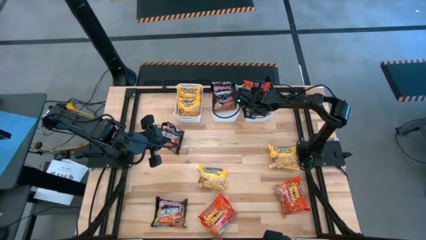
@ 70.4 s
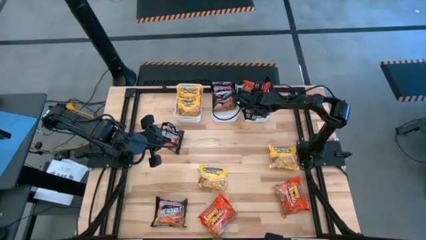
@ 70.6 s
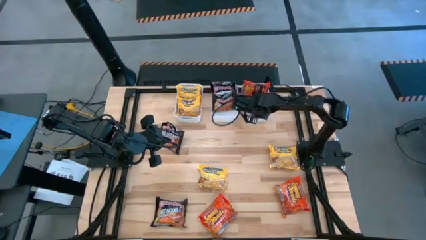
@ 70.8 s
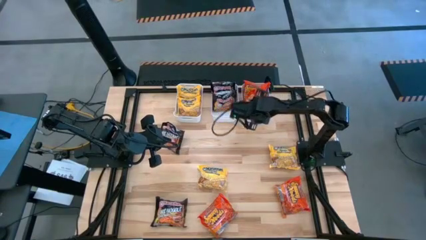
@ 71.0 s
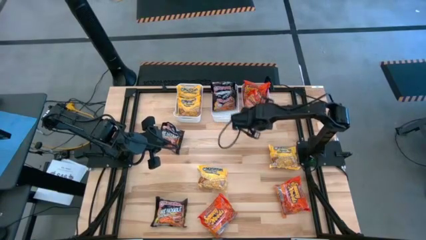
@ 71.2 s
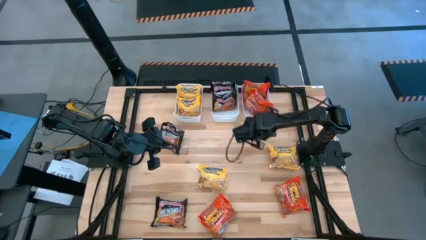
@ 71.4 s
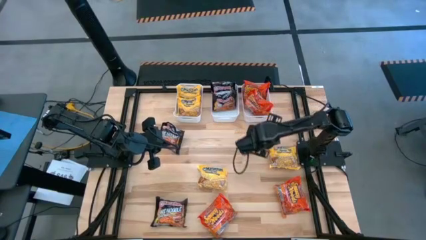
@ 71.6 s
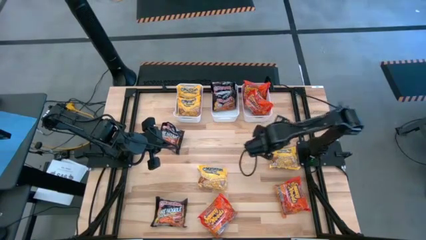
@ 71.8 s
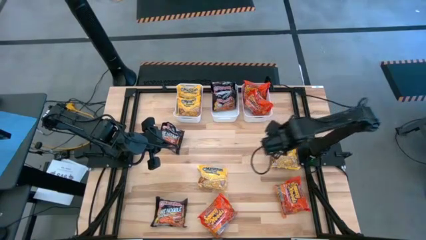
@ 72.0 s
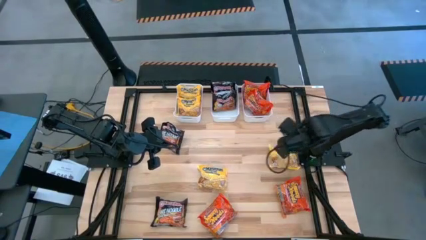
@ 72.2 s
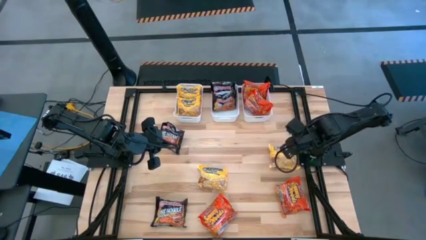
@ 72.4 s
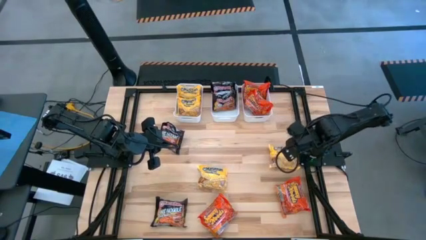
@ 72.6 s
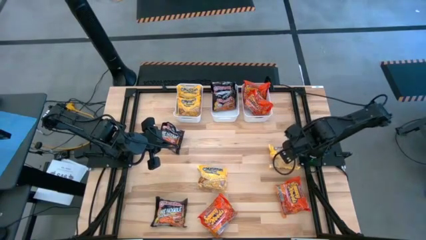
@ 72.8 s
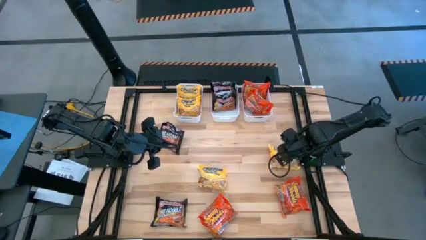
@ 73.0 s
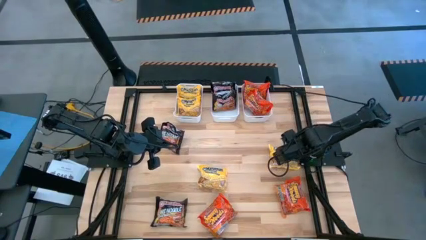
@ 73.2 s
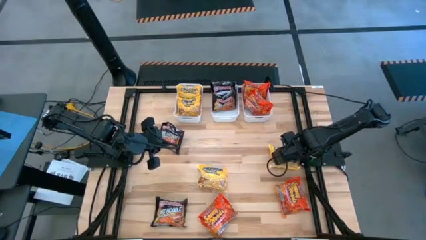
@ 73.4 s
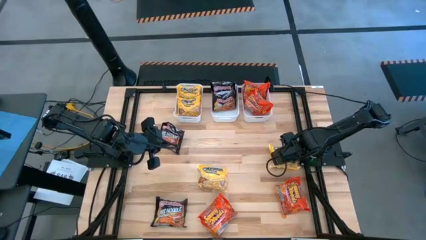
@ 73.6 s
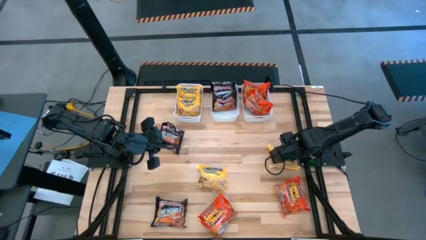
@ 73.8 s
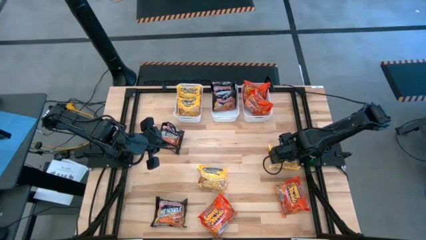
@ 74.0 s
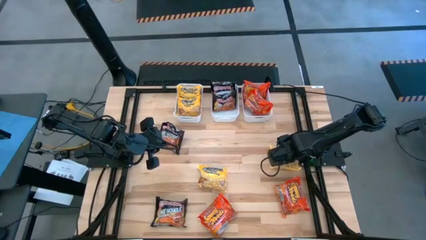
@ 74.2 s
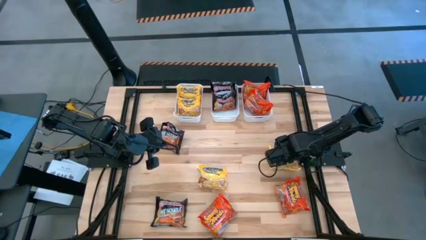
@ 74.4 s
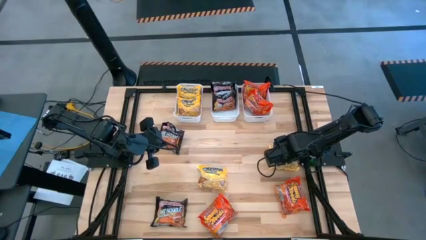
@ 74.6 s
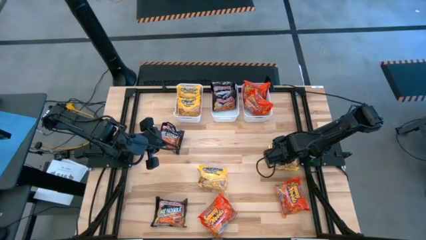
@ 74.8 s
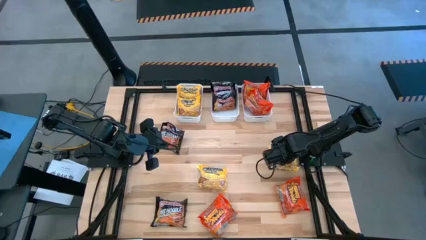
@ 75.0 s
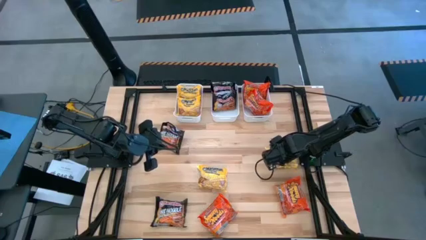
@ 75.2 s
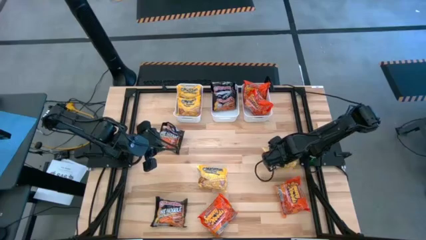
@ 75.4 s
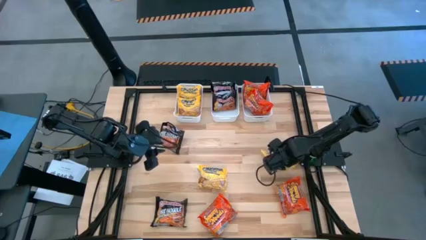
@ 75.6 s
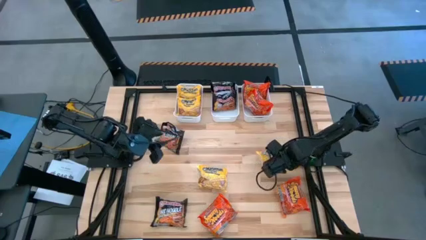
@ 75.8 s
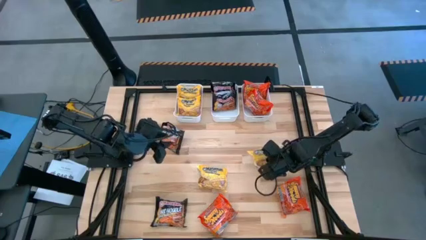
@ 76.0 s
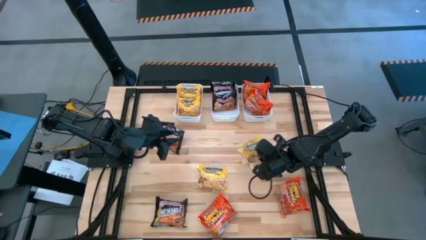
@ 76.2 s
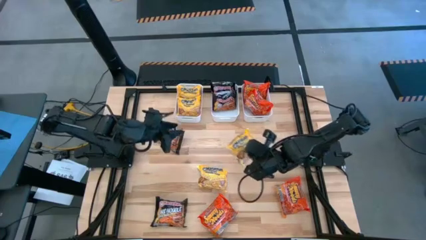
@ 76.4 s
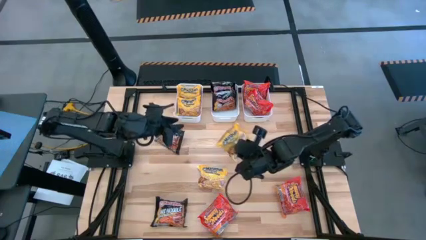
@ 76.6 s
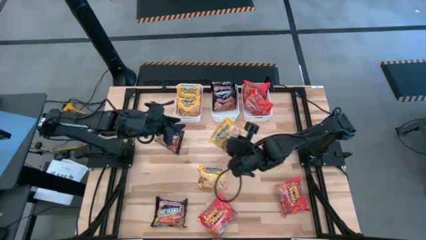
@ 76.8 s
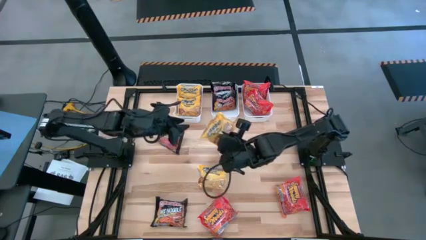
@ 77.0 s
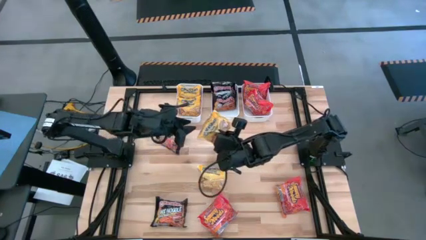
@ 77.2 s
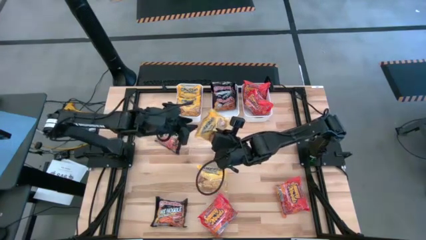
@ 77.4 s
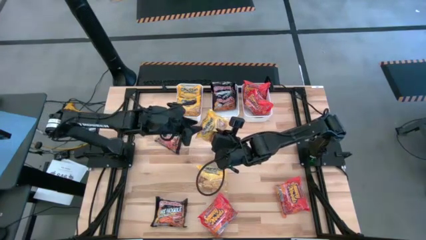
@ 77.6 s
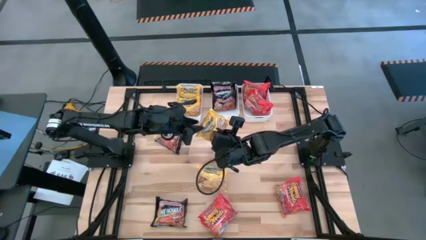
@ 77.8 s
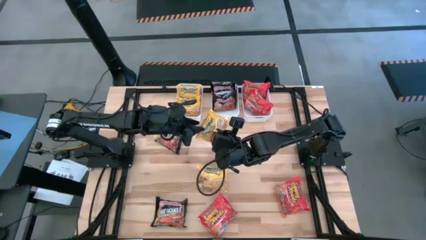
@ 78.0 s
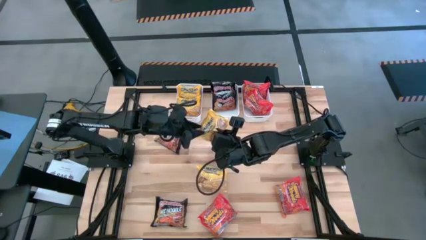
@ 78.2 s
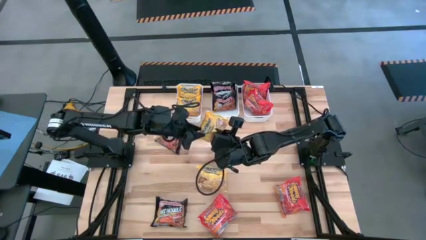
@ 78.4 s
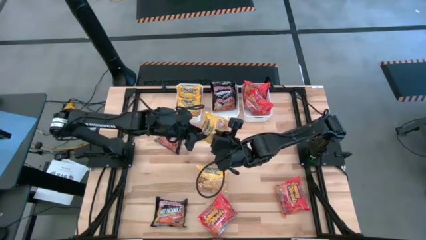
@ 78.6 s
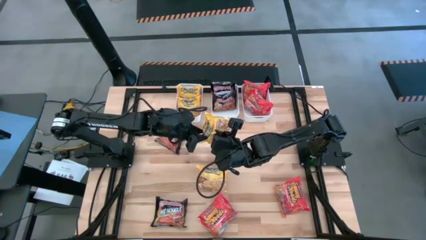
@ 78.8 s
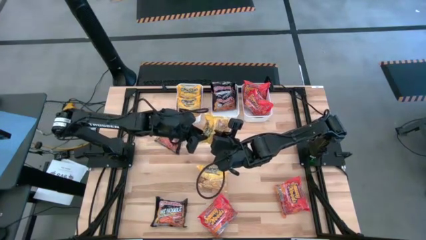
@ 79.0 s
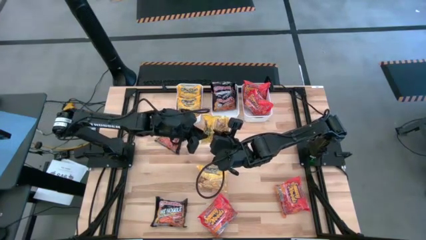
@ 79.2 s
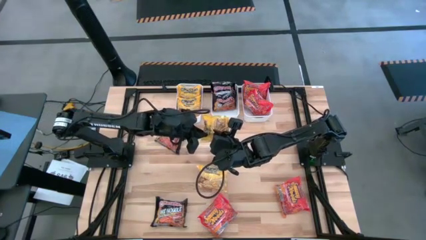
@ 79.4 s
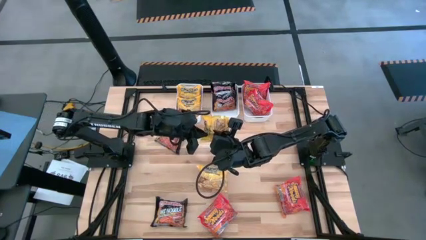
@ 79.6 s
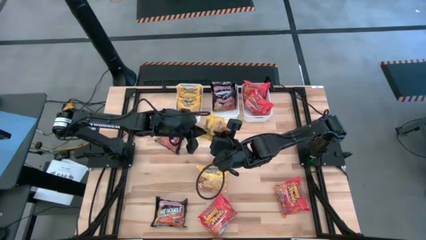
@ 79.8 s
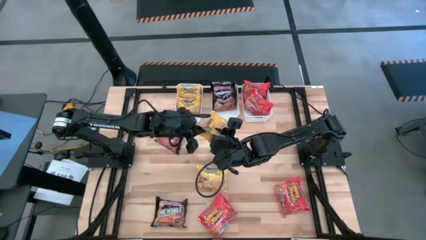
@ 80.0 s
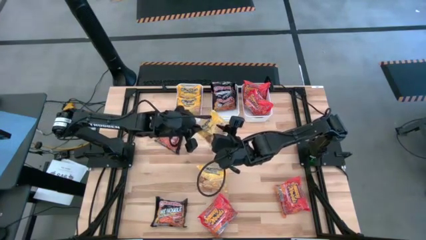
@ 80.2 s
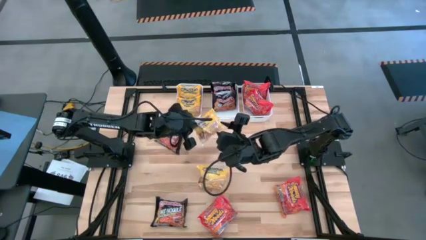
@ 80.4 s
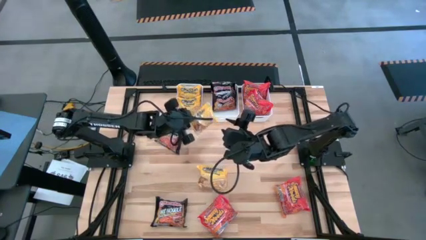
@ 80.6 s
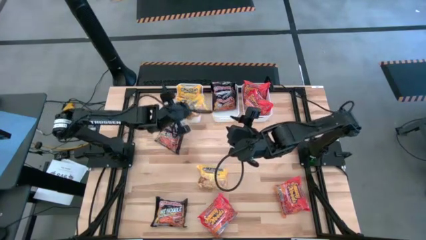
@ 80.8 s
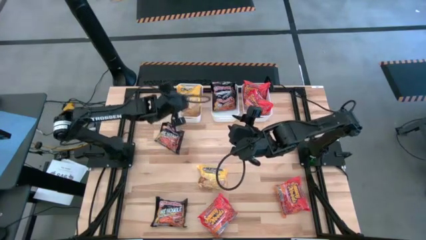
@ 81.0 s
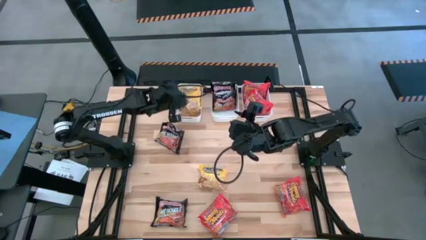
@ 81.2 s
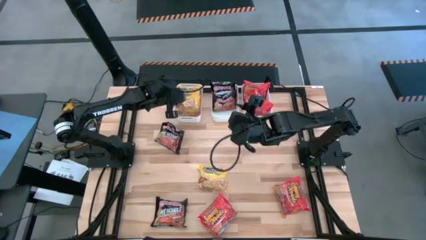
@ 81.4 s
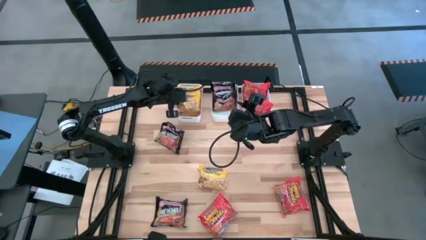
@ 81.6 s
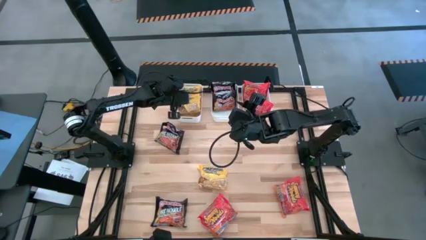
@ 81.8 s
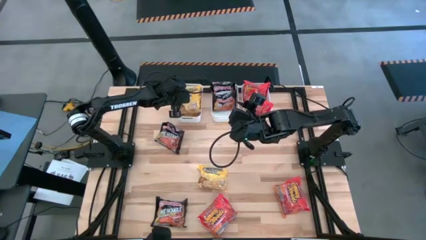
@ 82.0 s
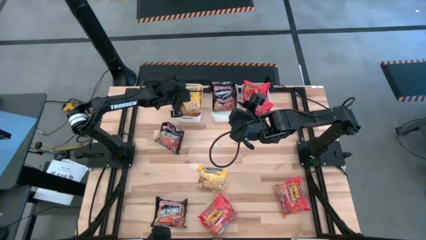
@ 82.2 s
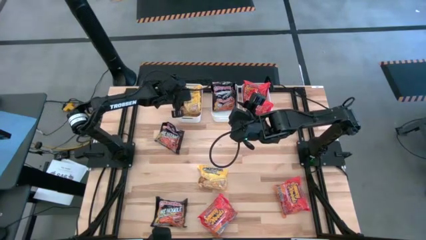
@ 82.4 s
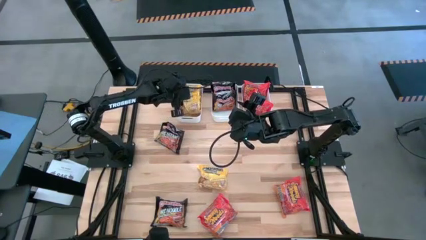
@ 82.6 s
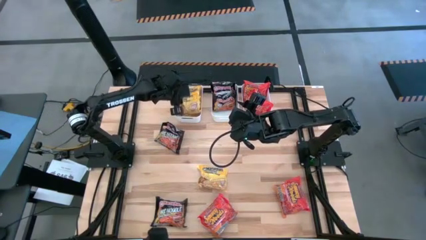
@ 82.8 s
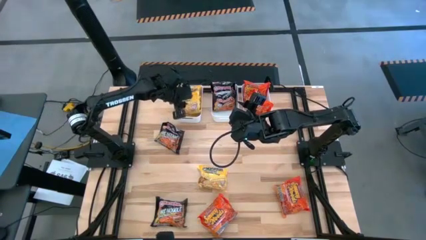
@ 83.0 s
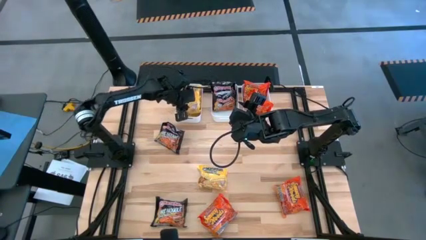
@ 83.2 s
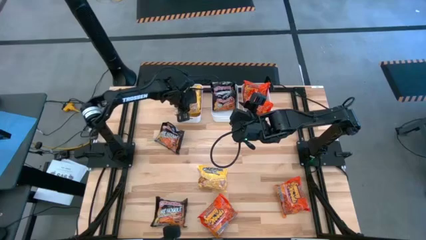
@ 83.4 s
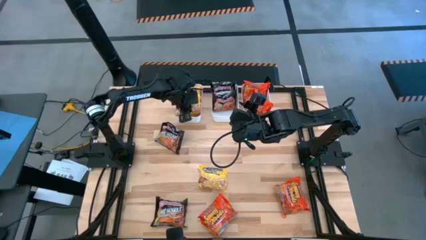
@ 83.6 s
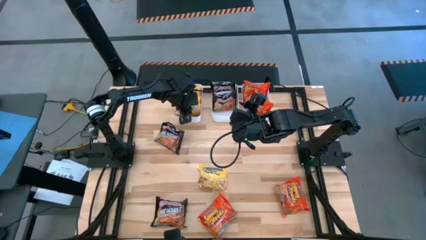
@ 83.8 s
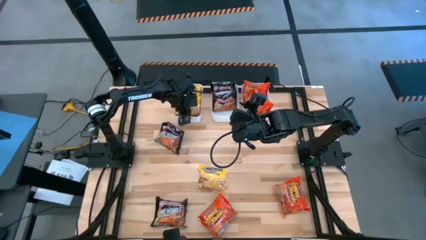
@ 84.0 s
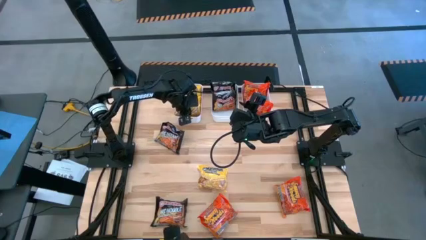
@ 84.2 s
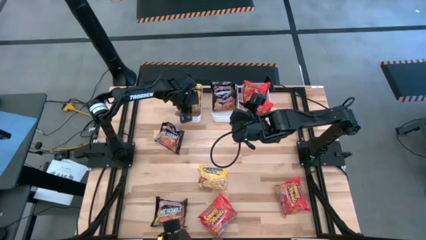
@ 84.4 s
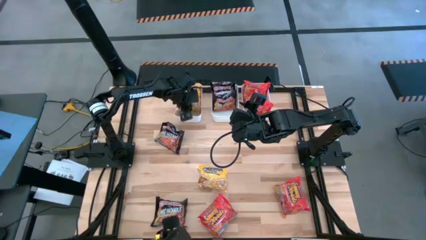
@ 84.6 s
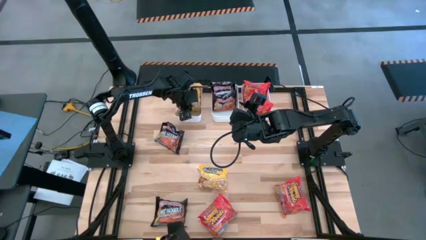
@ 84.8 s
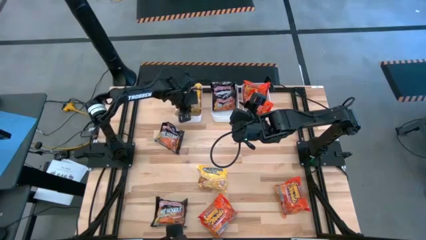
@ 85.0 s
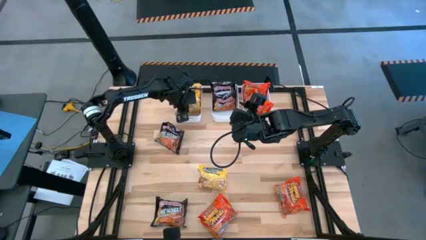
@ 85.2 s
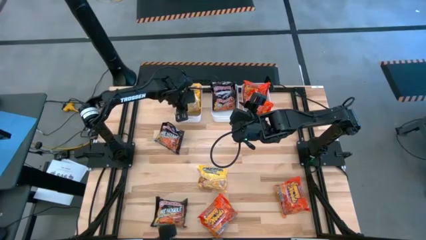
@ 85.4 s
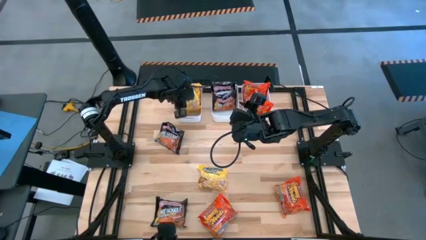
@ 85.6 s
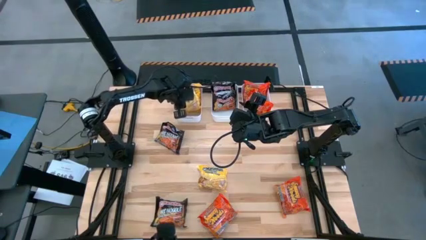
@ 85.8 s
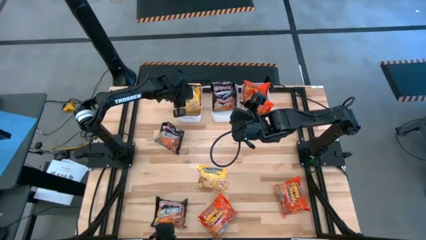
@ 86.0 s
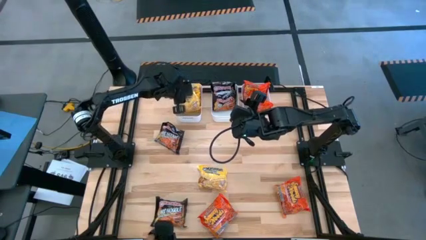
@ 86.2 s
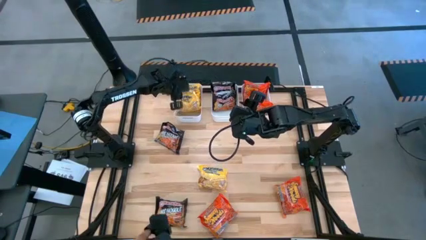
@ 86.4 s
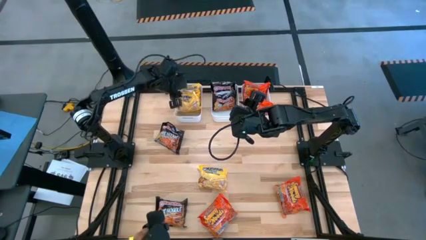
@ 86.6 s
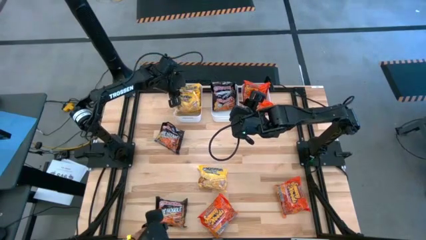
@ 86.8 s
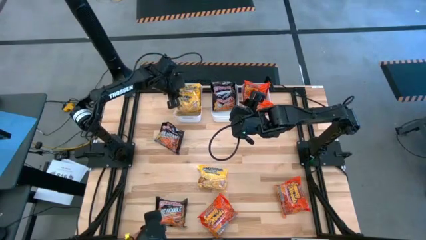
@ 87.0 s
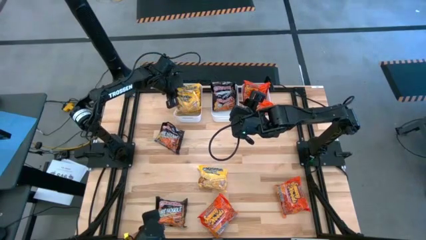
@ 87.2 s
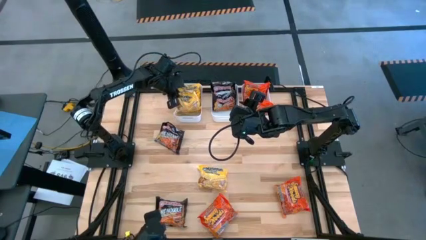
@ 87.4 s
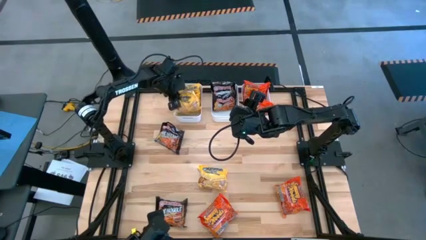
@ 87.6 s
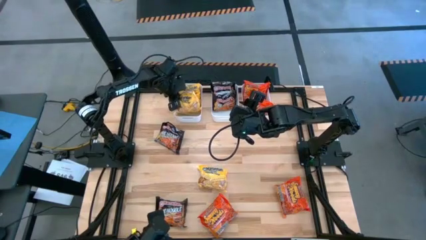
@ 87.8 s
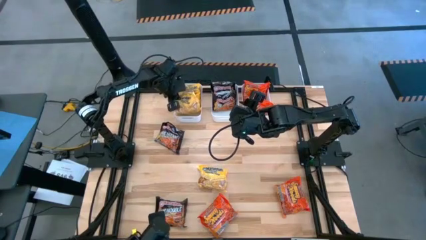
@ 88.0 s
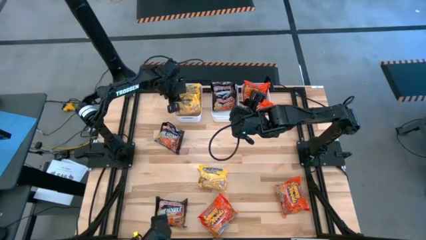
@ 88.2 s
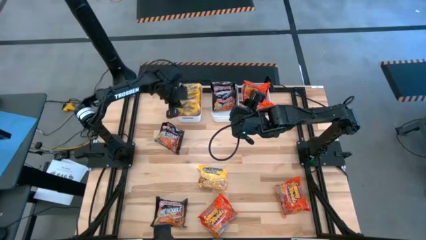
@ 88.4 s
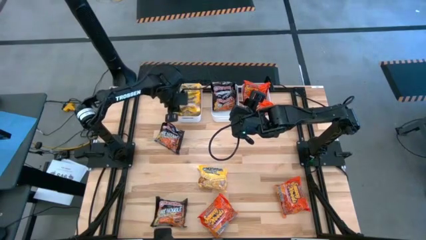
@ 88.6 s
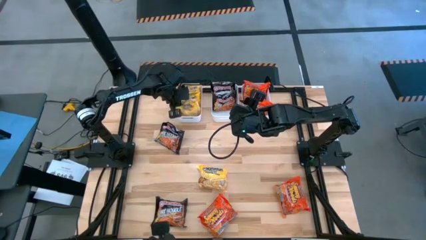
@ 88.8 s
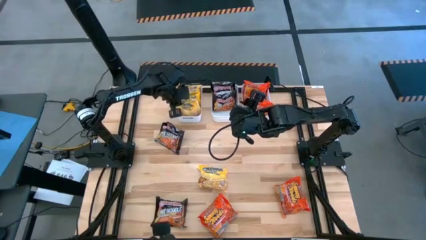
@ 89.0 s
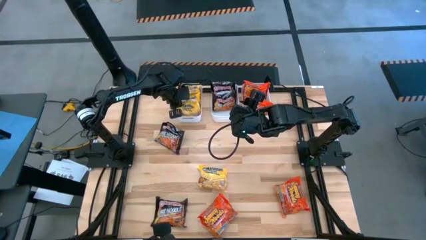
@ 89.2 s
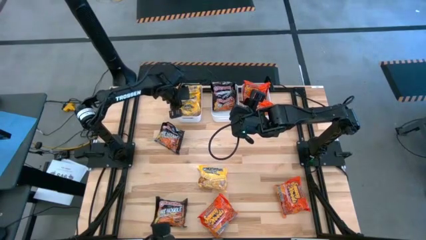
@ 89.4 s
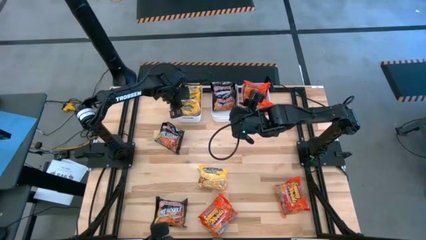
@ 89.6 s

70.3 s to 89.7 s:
Task: Sort Maruchan noodles
Put the yellow noodle pack into the left white bin
